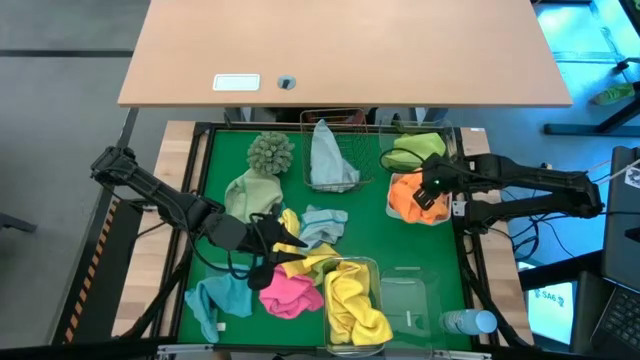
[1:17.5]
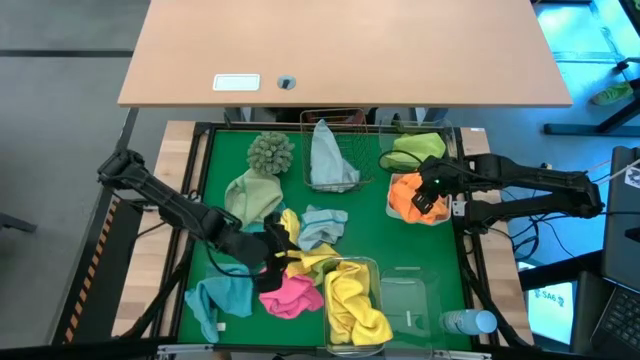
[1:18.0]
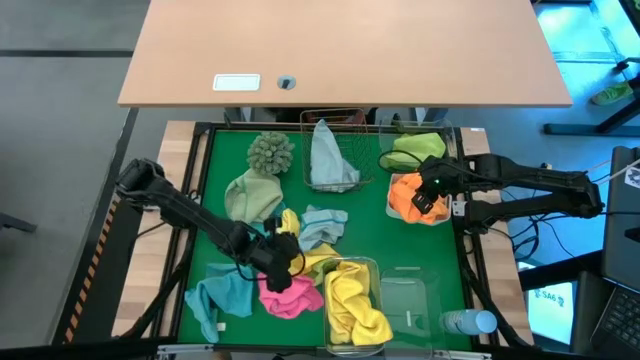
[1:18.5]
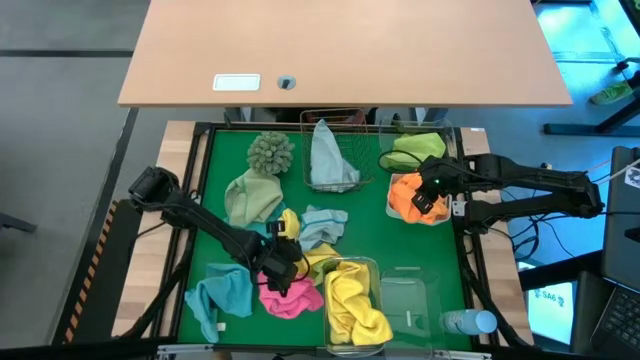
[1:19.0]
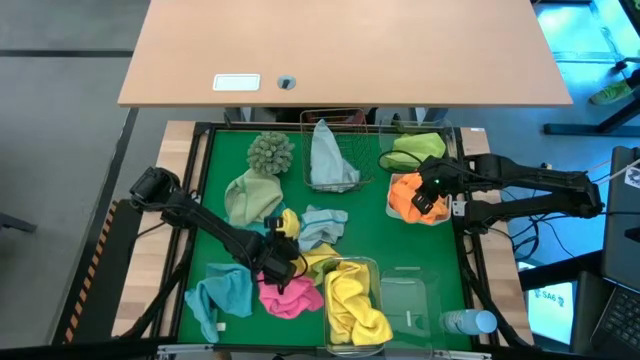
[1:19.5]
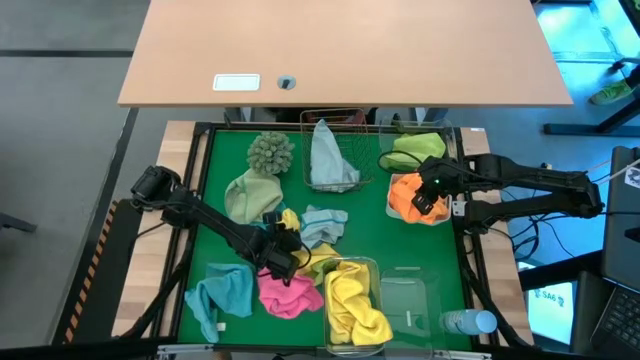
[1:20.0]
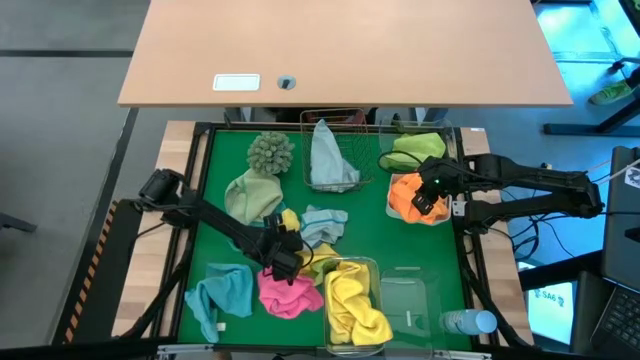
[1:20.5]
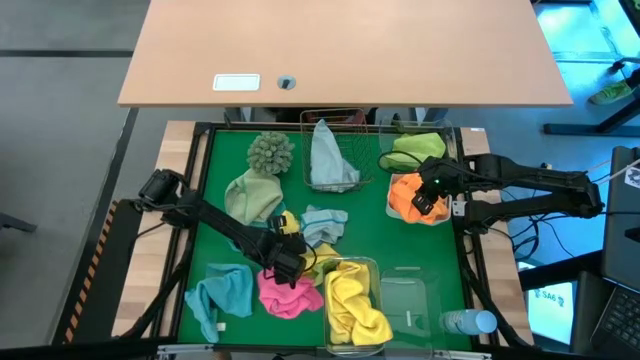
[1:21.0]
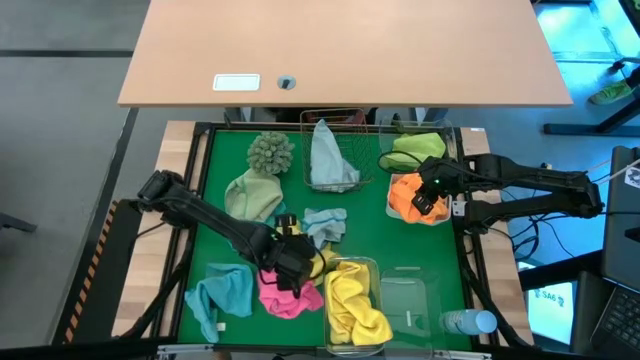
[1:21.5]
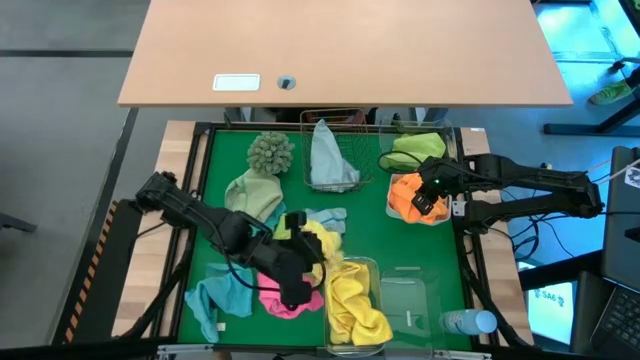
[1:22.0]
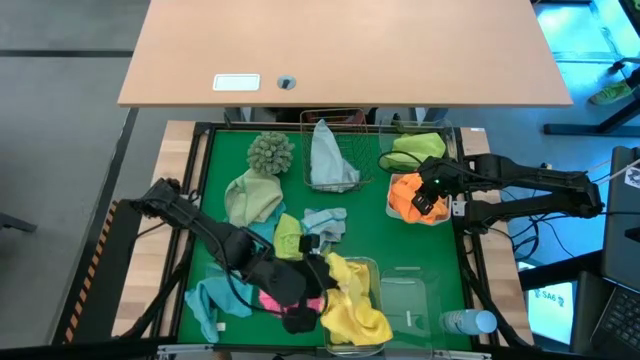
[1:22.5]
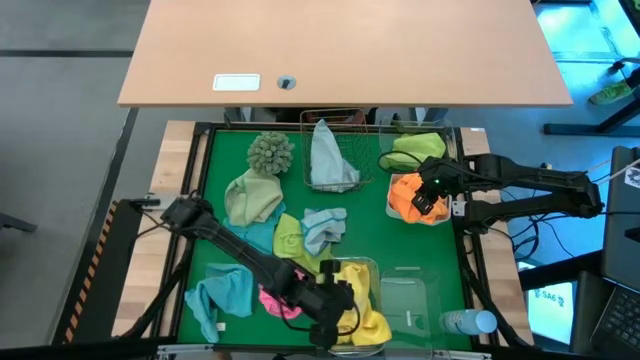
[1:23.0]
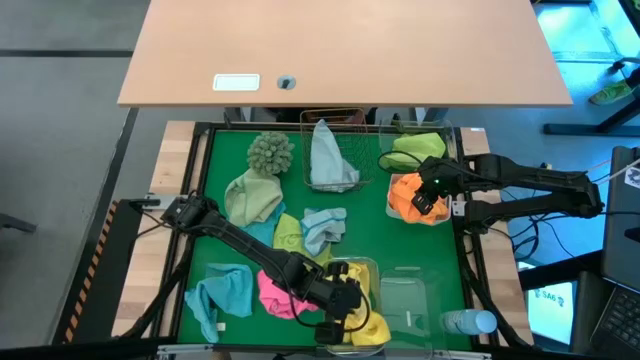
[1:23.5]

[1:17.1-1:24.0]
Task: Sort microfiber towel by color & place in baskets
Put the yellow microfiber towel into the bottom left transparent bin

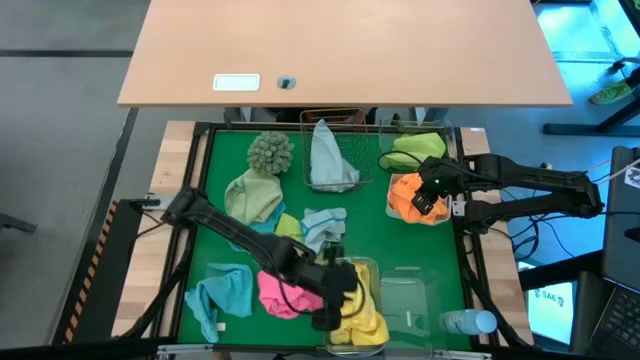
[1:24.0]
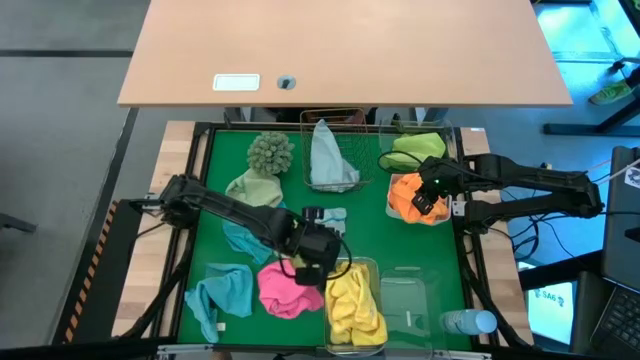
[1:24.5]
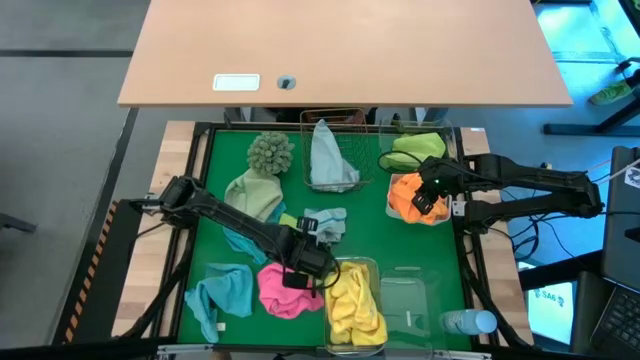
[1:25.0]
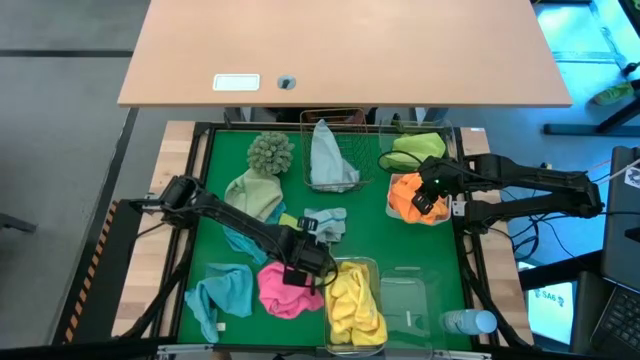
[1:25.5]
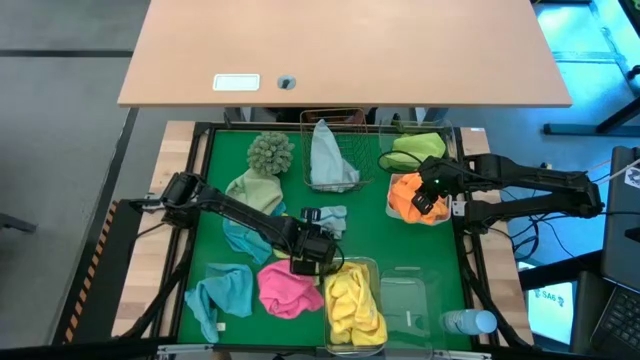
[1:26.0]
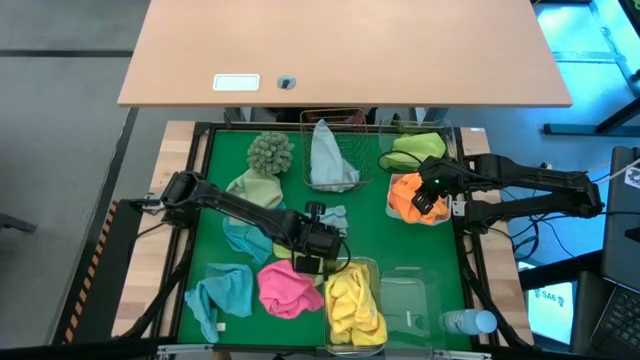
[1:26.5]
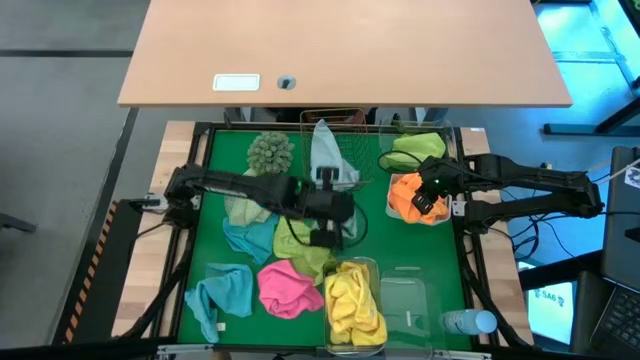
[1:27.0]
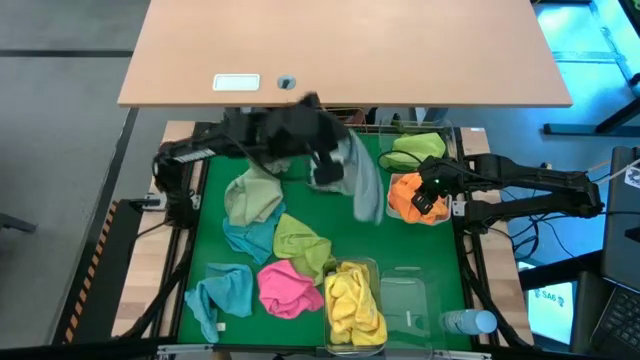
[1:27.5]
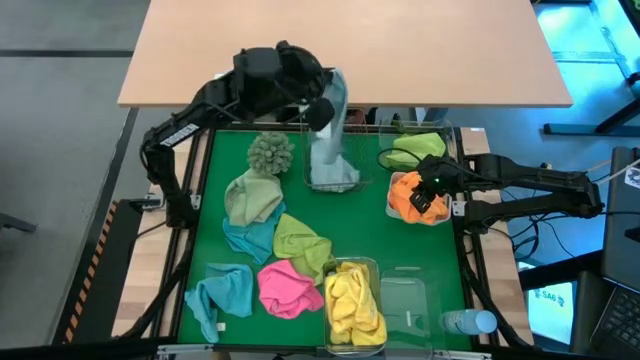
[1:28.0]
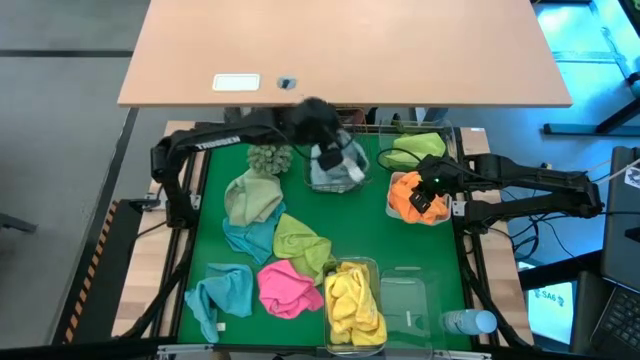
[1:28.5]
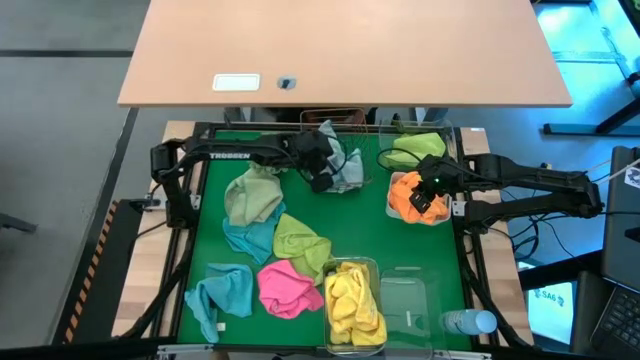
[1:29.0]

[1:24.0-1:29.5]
Put the blue microfiber towel into the wire basket

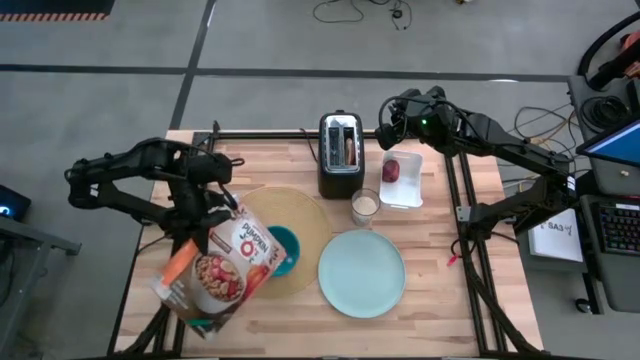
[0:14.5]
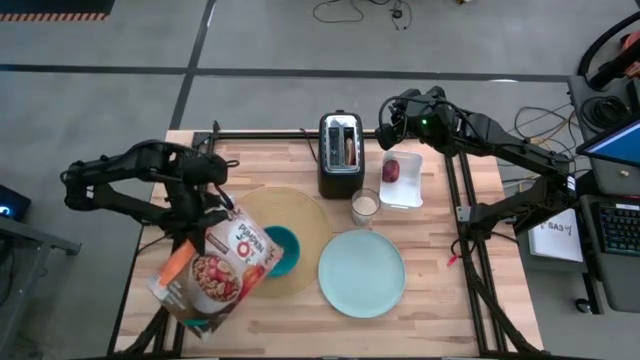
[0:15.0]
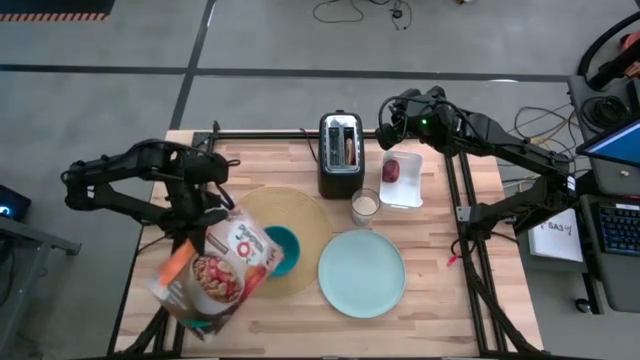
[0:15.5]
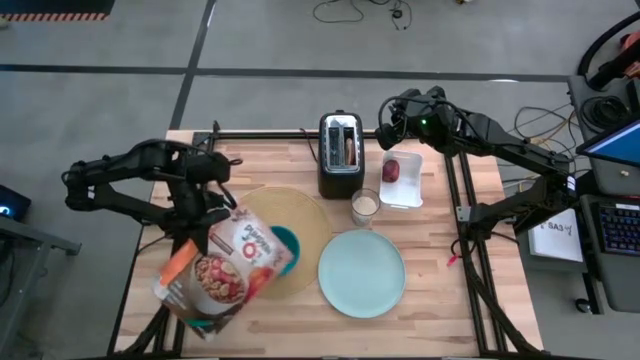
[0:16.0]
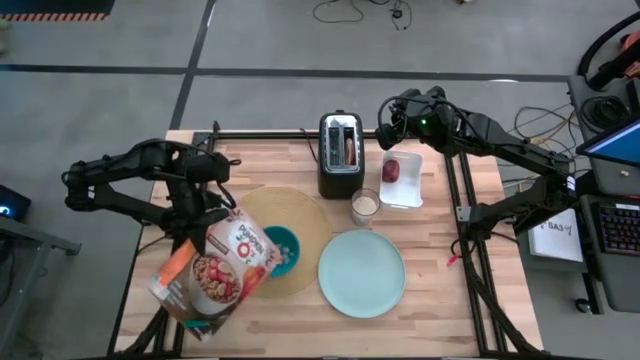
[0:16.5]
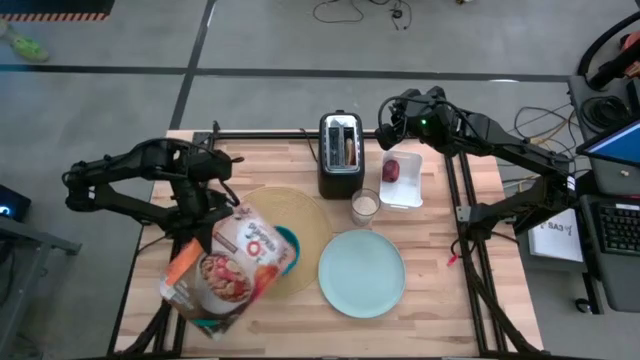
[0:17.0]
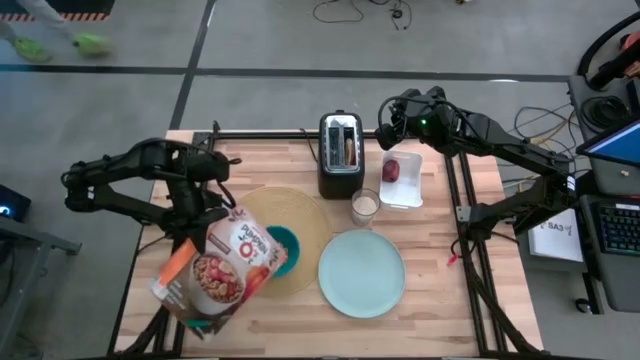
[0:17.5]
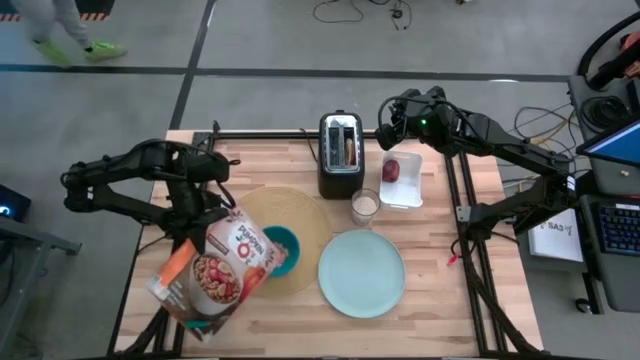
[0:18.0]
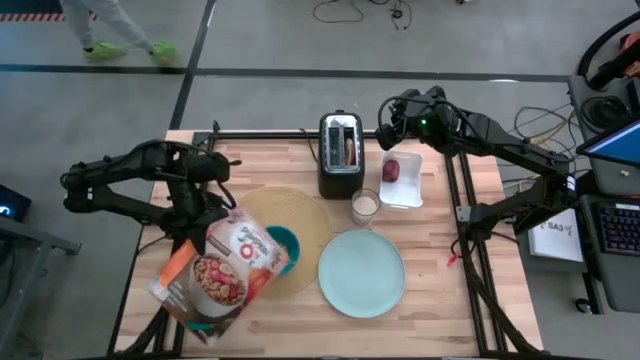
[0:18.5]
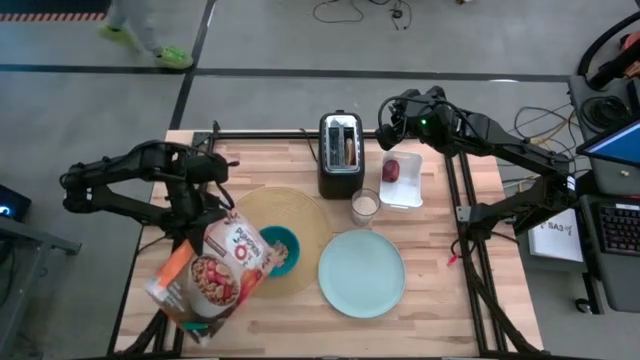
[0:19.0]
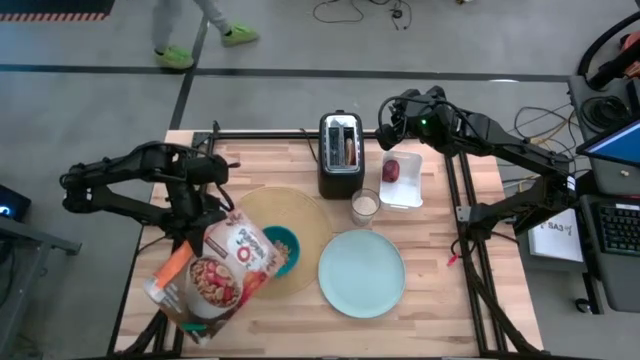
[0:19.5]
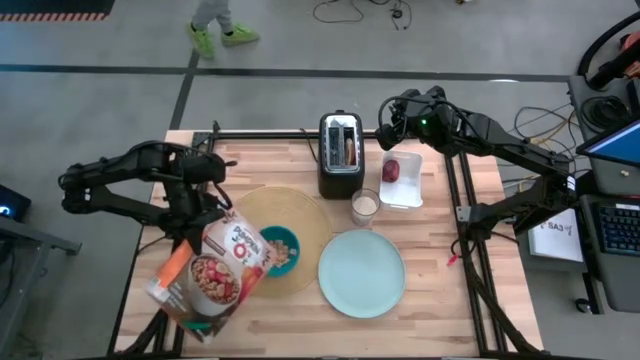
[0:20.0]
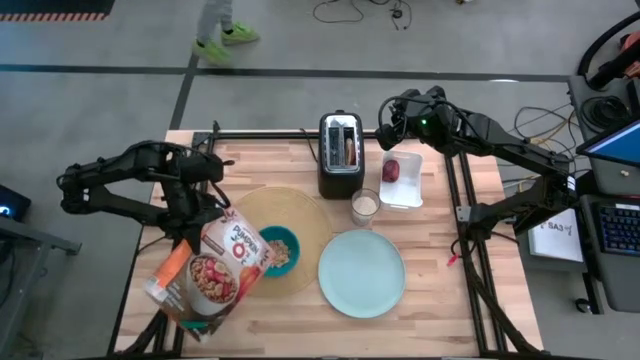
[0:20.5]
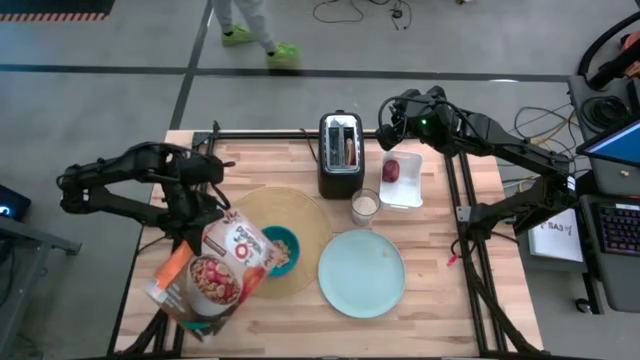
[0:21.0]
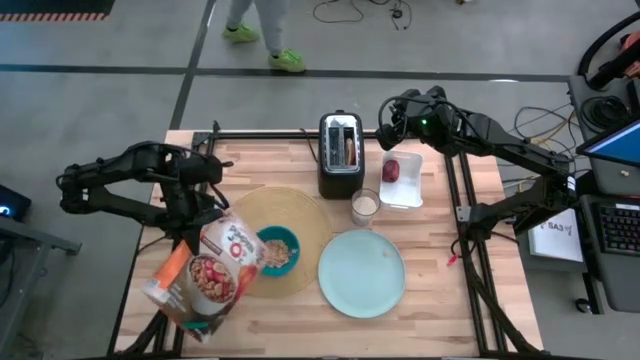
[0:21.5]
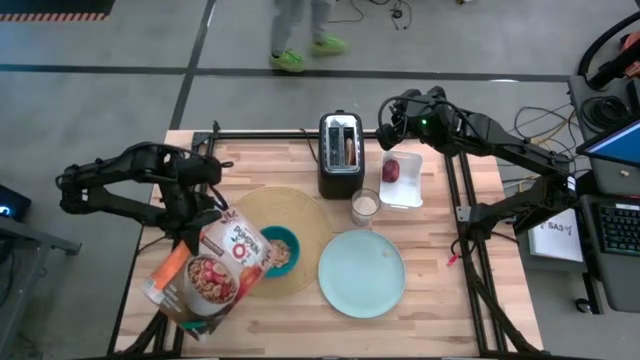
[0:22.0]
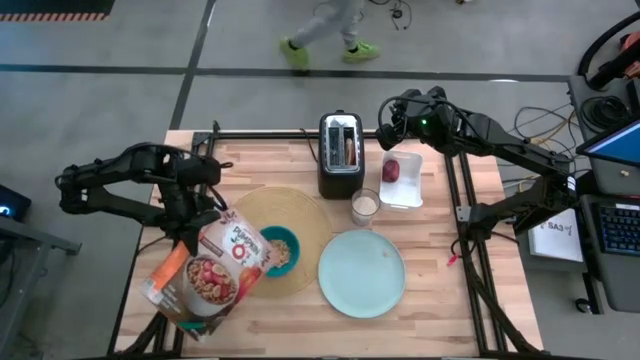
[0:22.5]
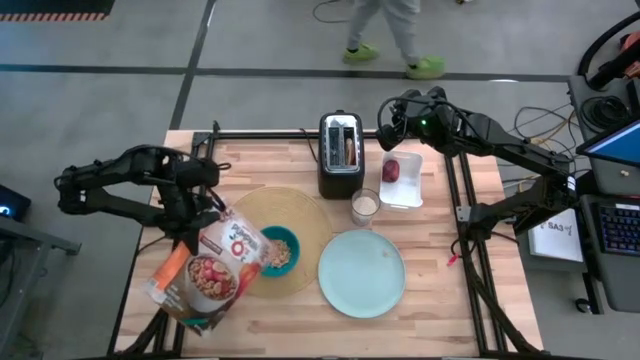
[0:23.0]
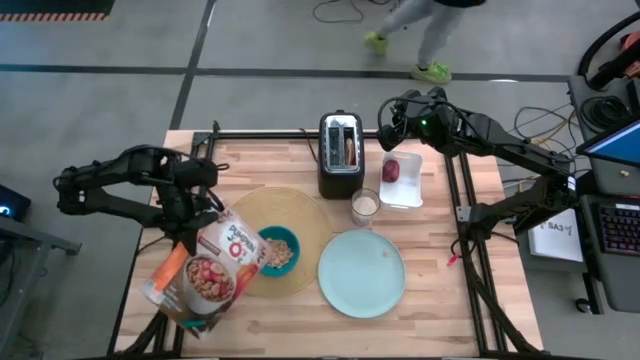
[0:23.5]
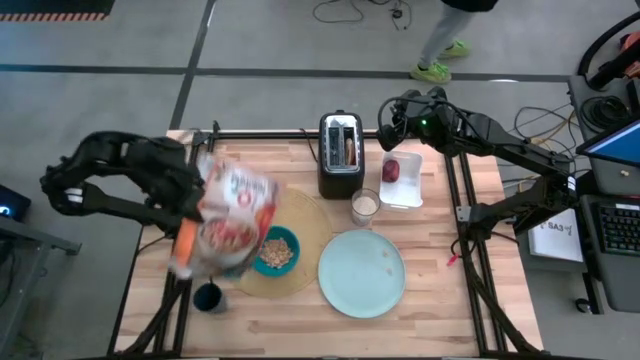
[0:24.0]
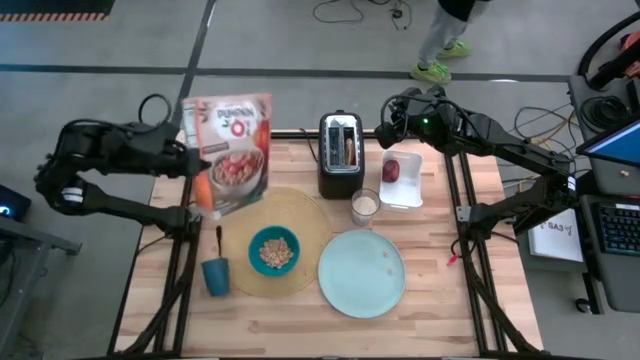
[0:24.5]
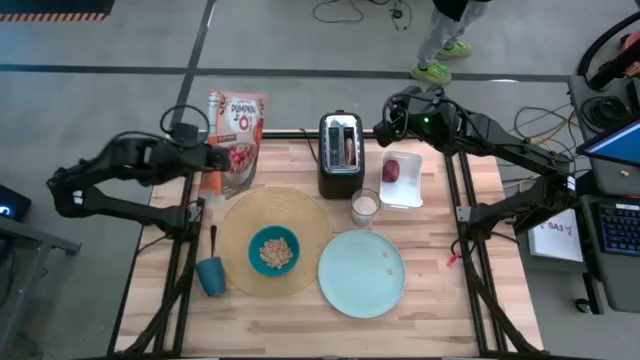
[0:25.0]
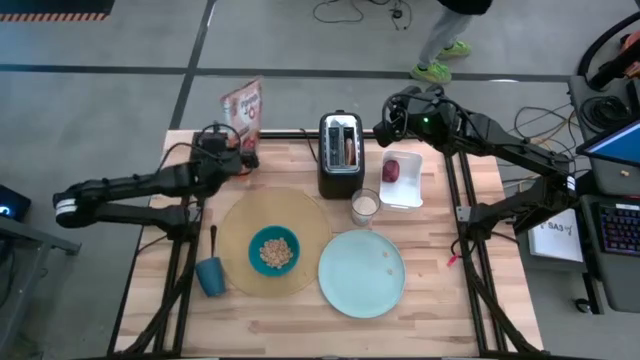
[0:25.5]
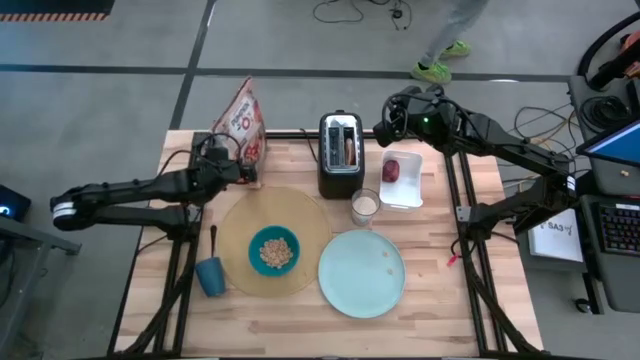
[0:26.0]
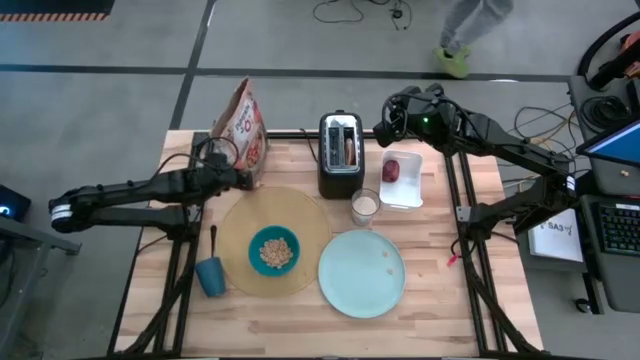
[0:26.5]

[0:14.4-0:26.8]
Task: Arrange a breakfast setting
Put the cereal from the cereal box into the blue bowl
